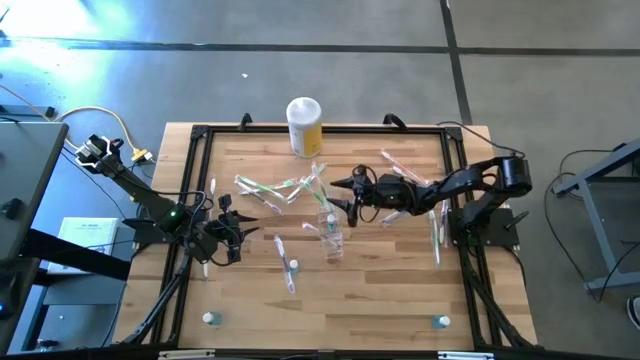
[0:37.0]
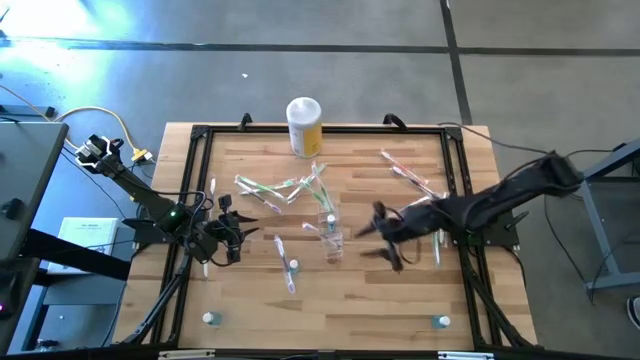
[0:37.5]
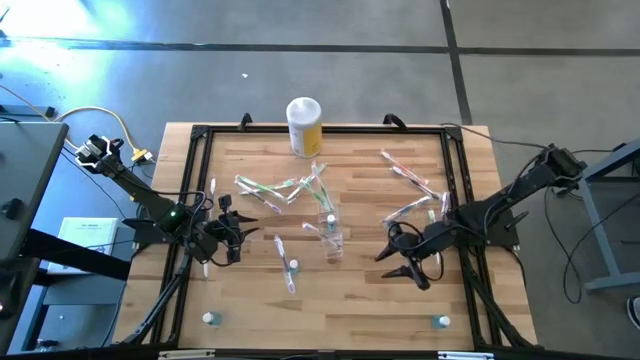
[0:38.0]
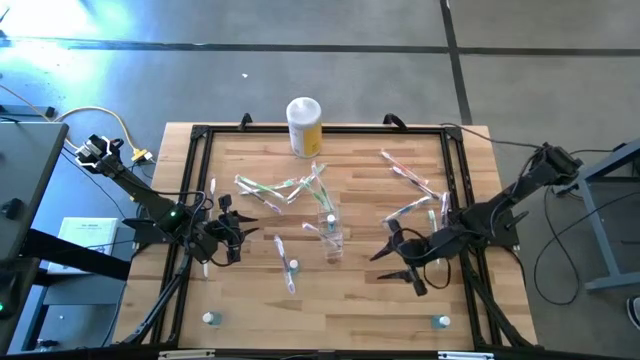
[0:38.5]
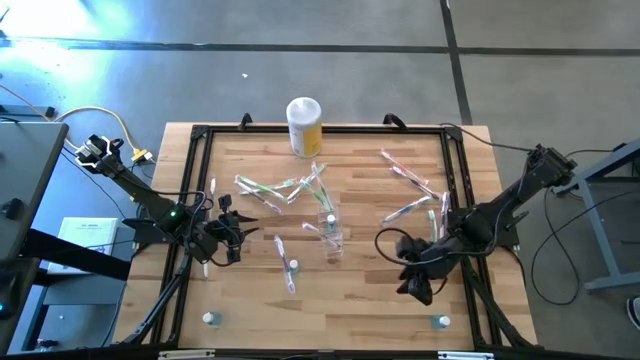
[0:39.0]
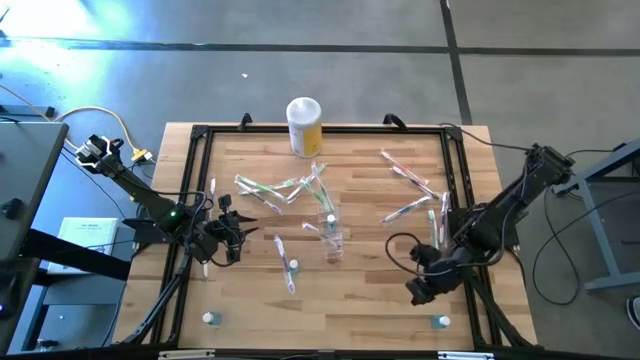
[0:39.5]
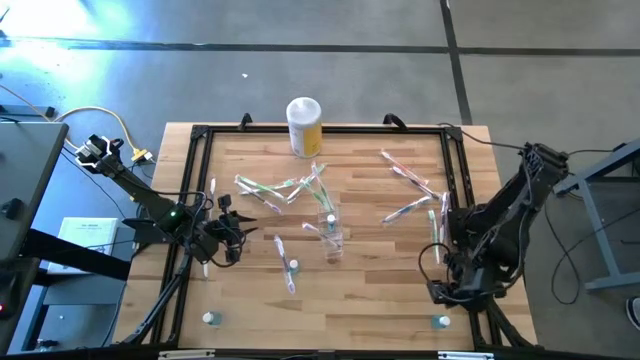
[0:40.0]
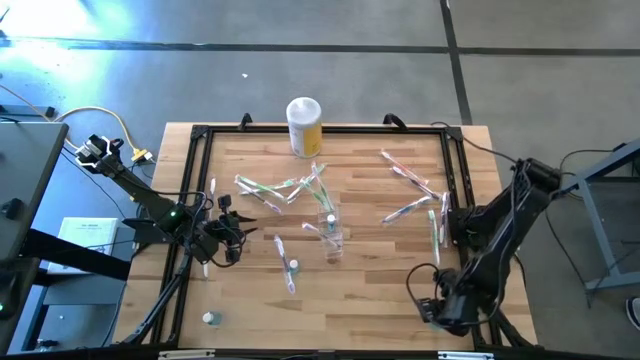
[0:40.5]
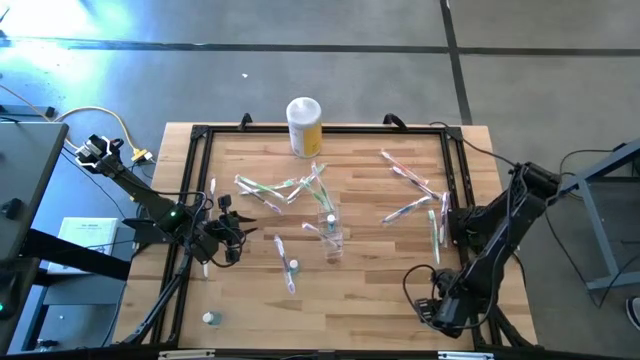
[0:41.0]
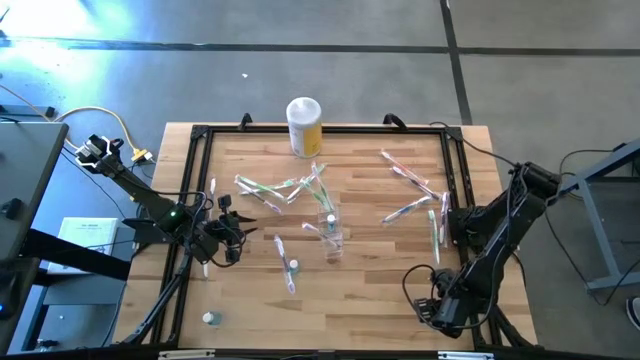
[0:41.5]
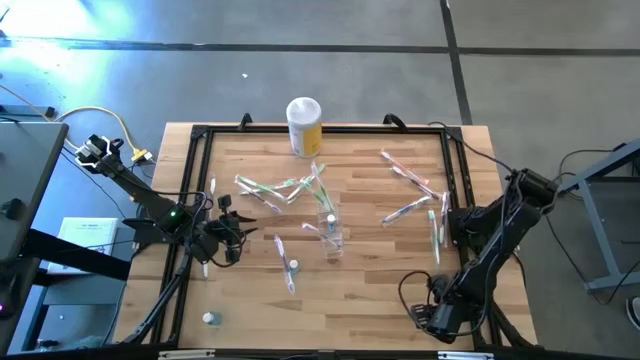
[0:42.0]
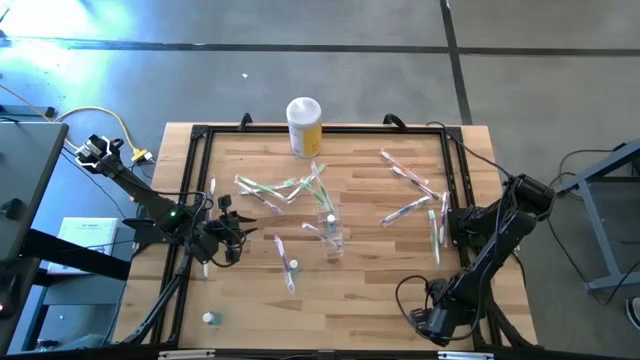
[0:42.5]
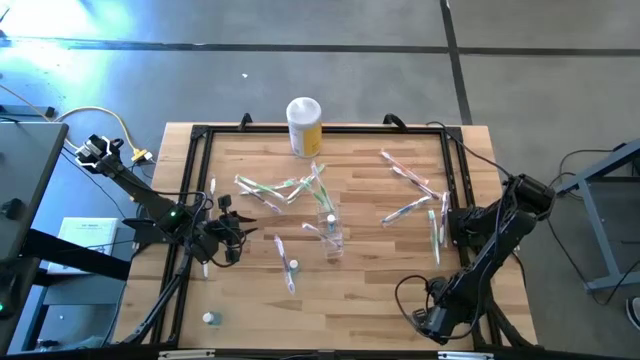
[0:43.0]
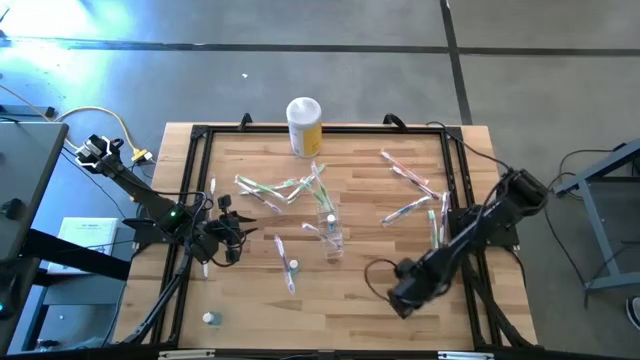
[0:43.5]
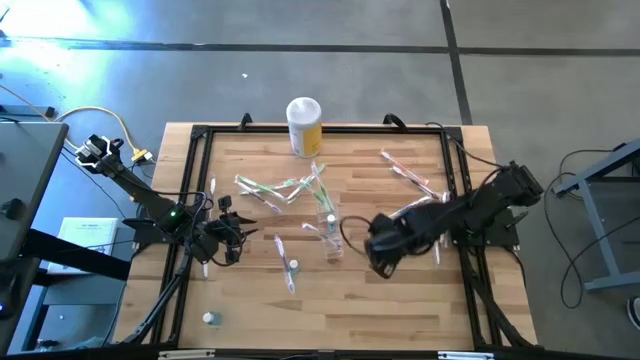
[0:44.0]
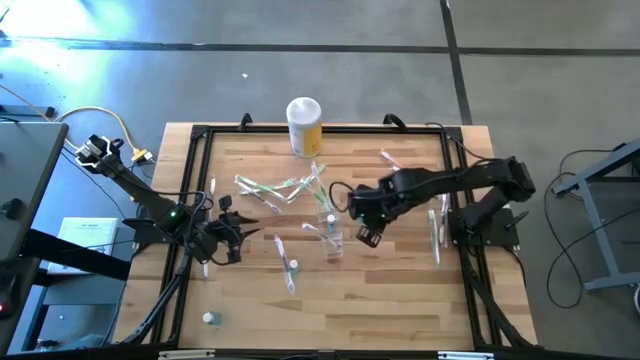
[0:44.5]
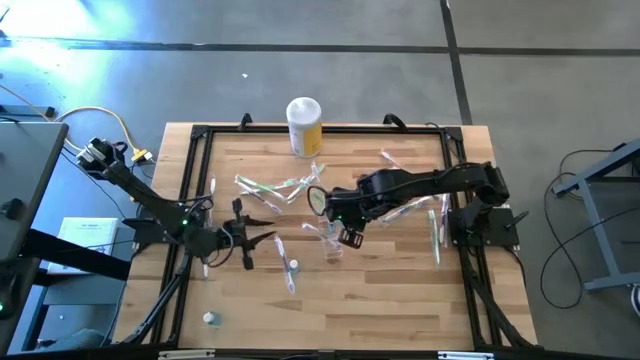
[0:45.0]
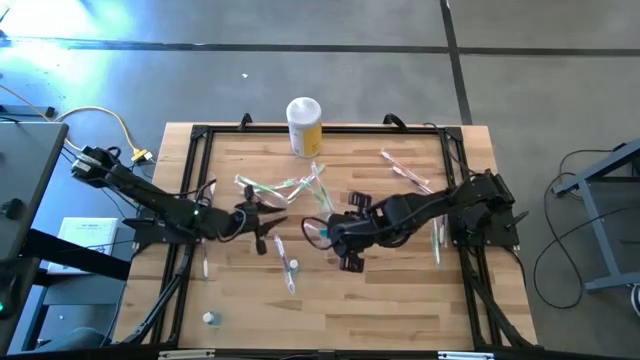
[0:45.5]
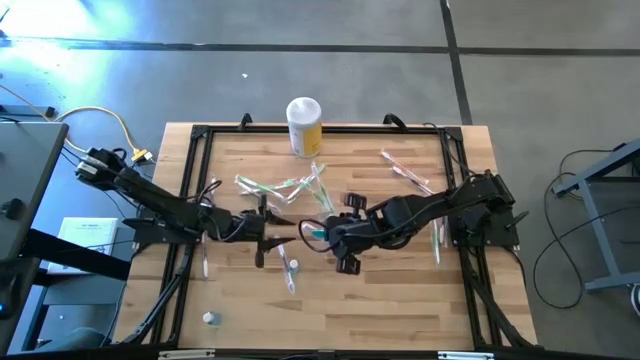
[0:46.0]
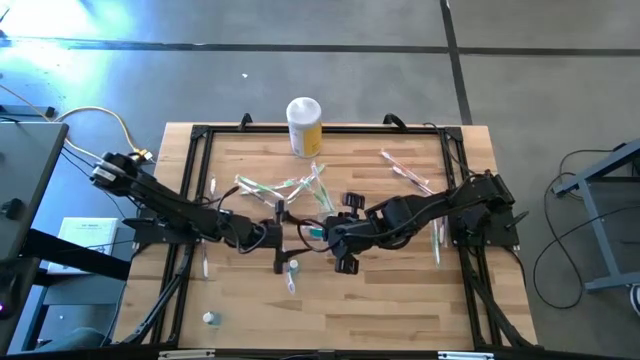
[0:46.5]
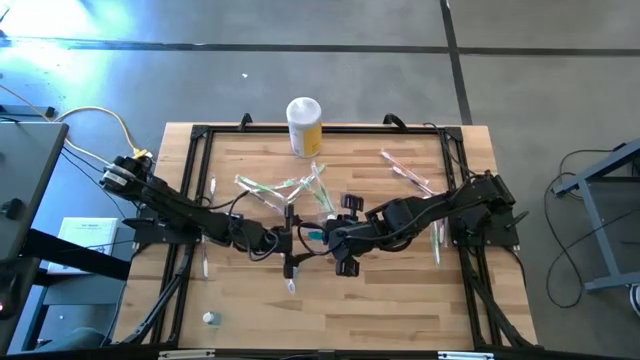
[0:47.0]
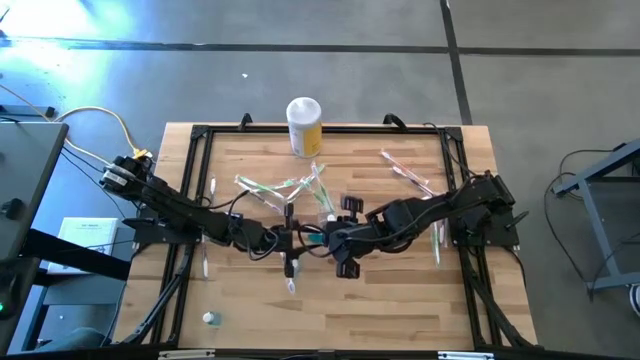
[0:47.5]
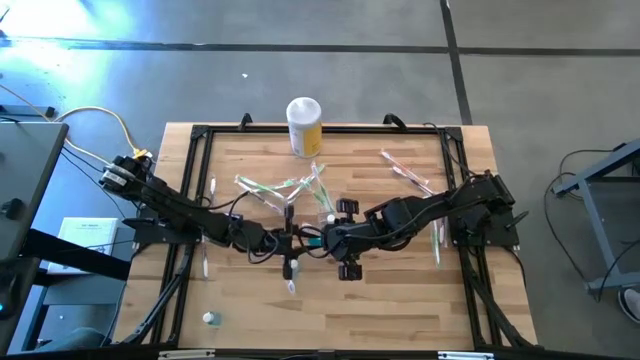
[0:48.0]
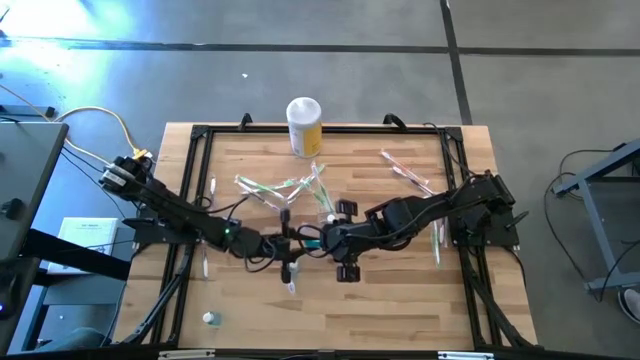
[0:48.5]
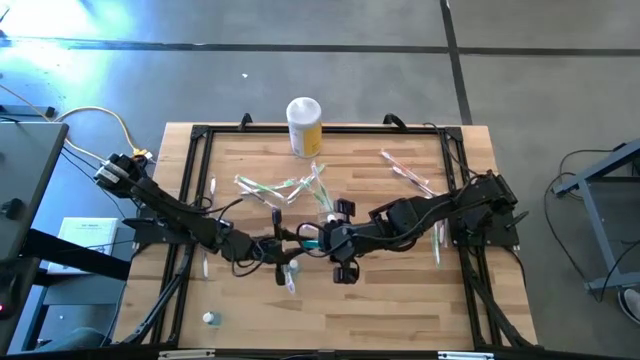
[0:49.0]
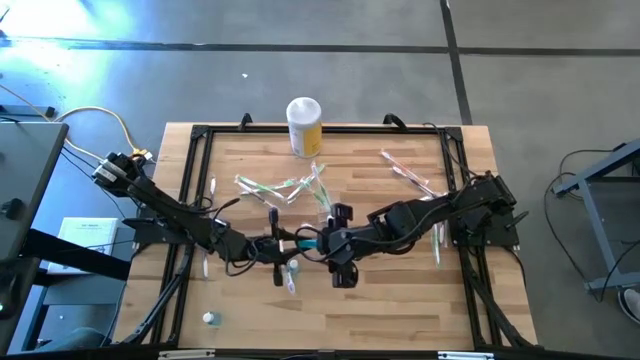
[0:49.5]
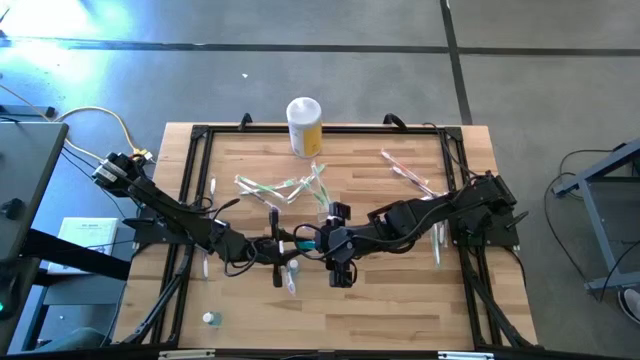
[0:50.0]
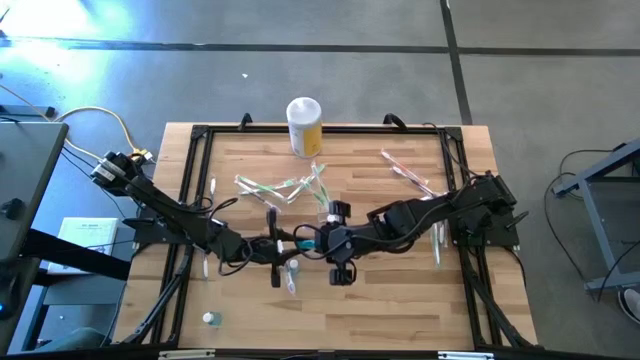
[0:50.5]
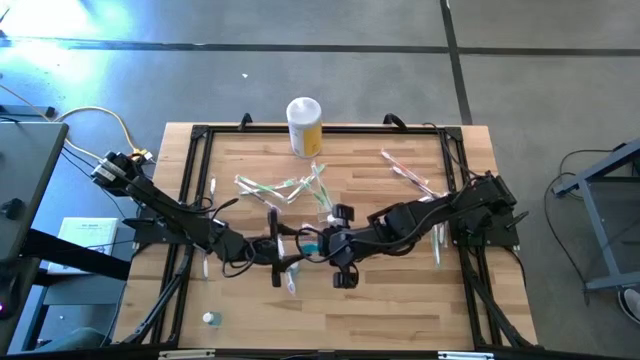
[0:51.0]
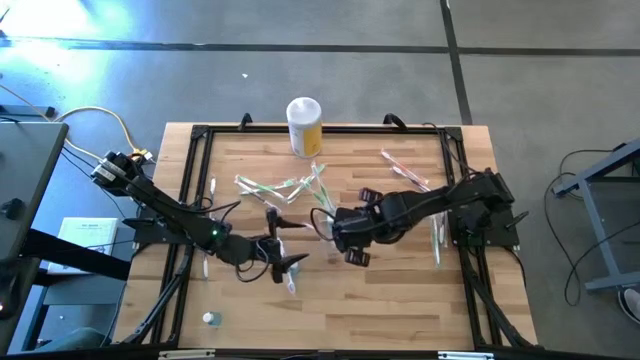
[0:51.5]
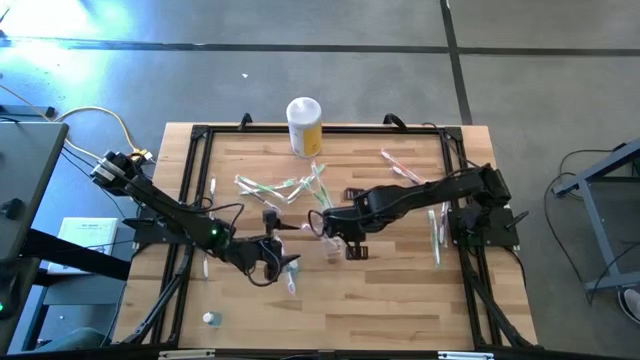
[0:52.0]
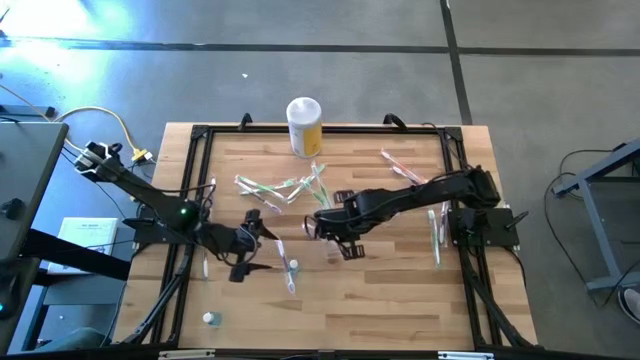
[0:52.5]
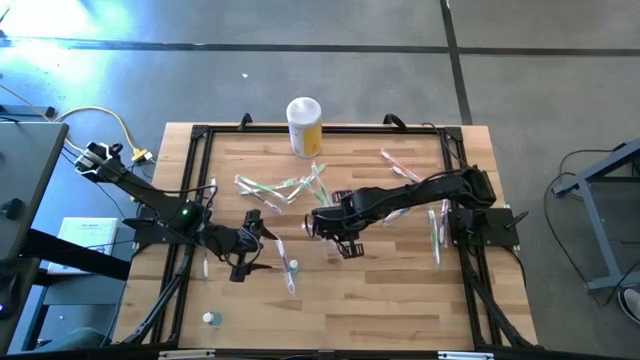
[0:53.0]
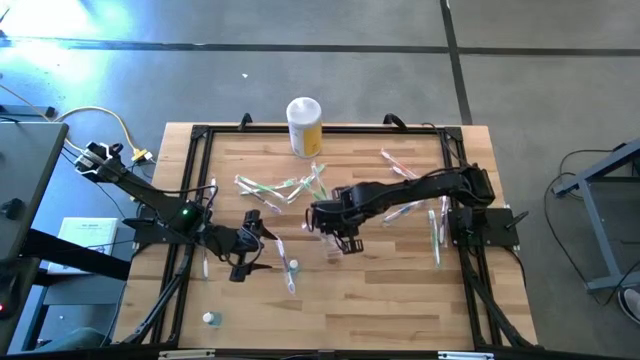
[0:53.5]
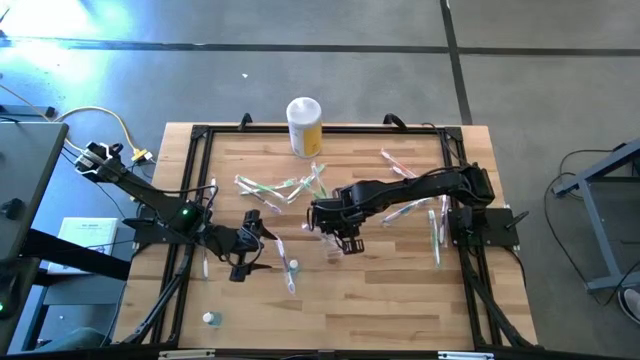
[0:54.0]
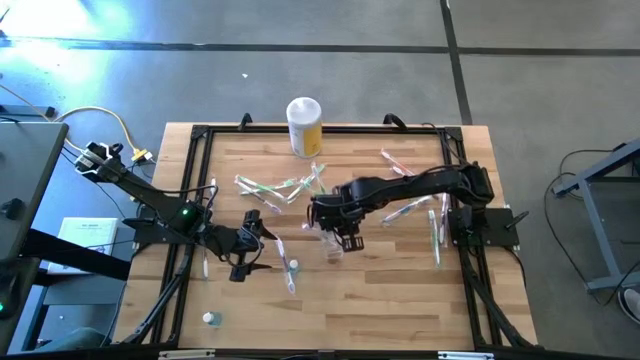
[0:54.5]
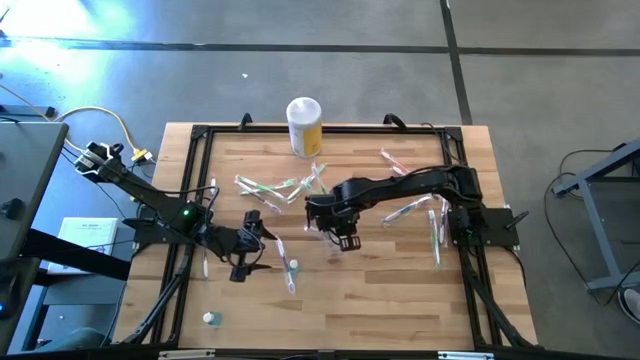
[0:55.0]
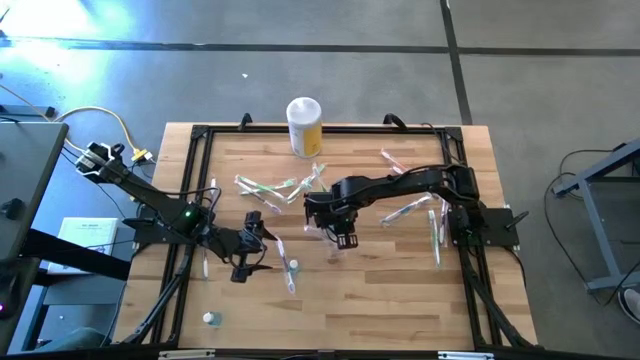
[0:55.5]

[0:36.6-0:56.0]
Task: Pick & Place toothbrushing station
Put the mouthwash bottle into the transparent organizer

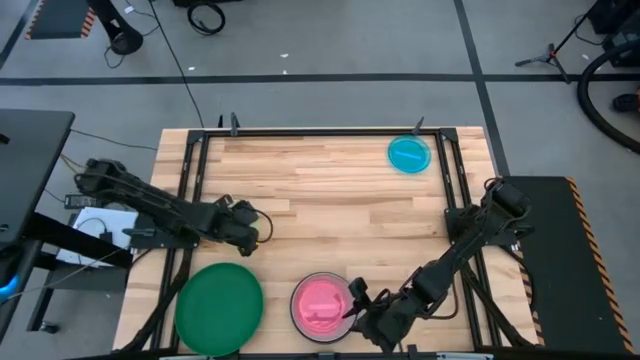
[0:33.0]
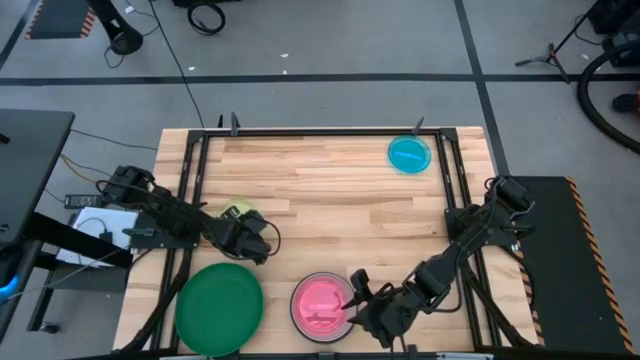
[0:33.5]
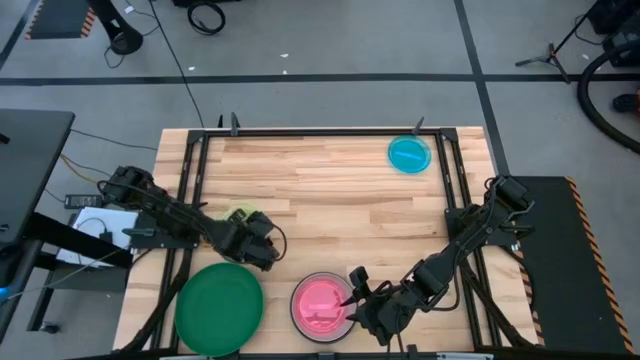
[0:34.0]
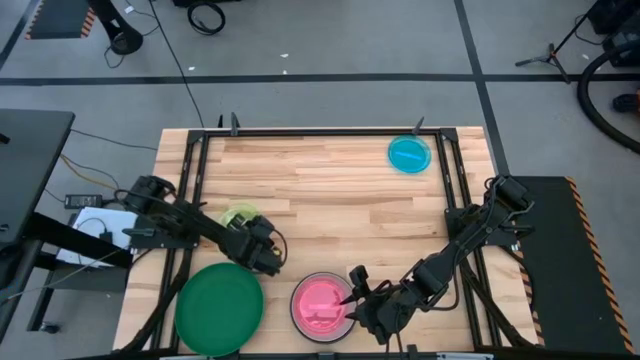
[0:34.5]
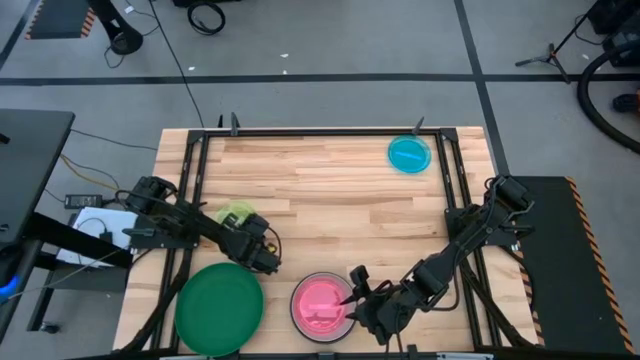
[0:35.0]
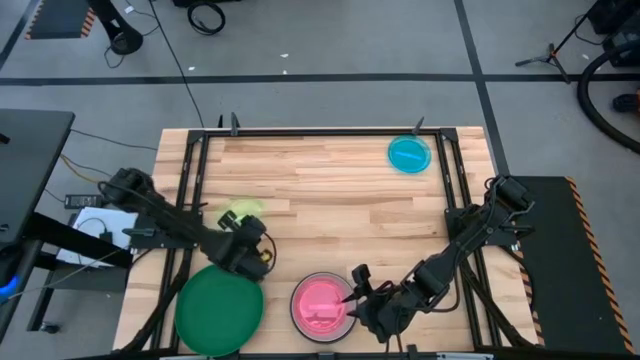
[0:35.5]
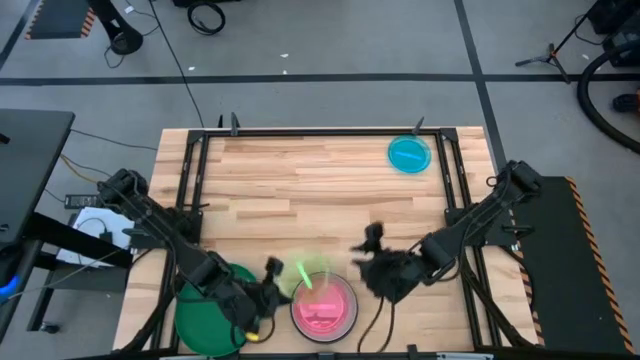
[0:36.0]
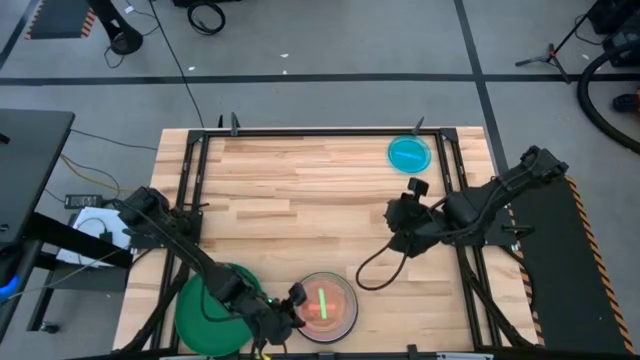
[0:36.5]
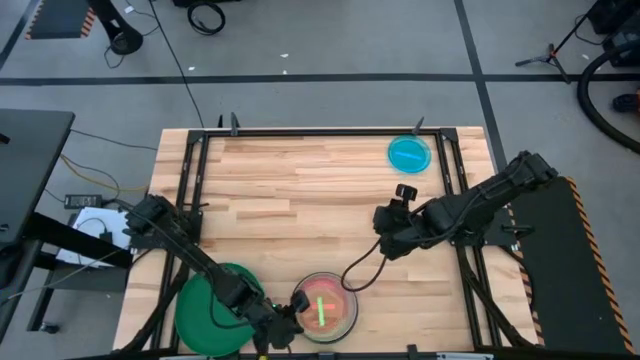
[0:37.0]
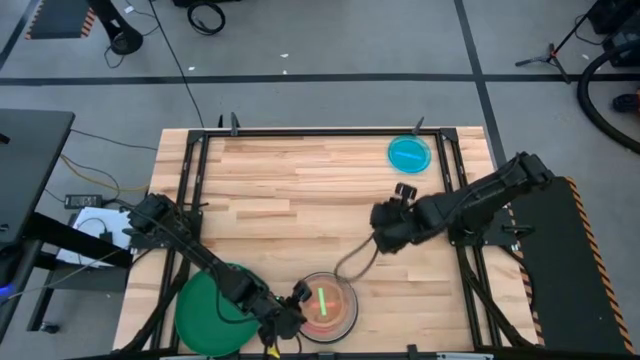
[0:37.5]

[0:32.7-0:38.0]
Task: Stack plastic plates
Stack the light green plate on top of the pink plate
